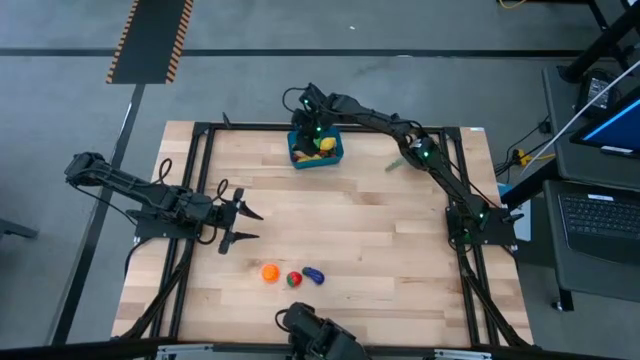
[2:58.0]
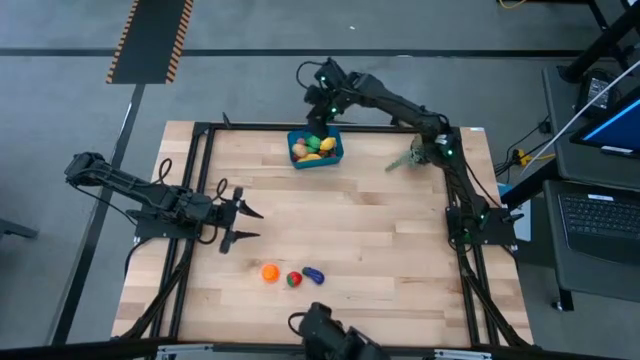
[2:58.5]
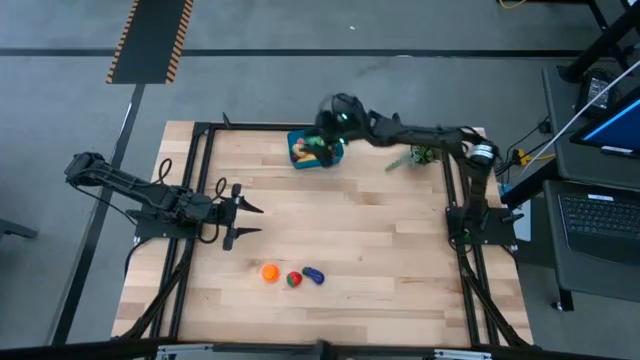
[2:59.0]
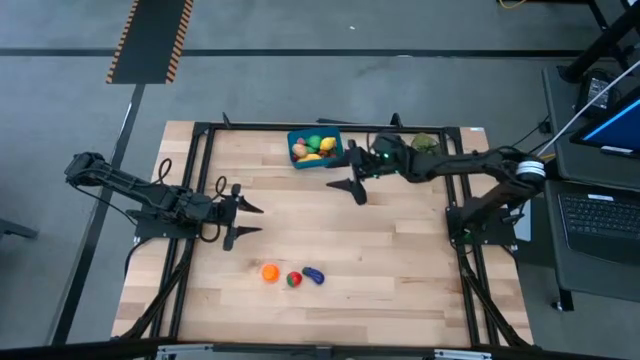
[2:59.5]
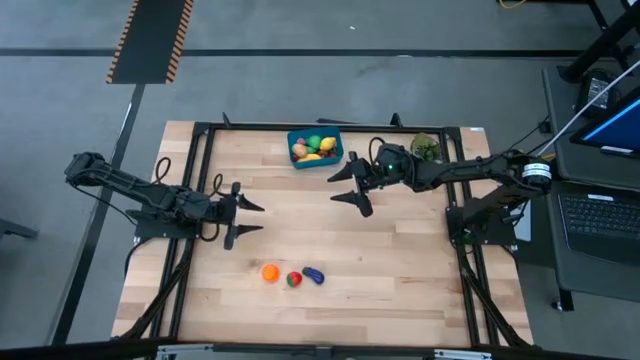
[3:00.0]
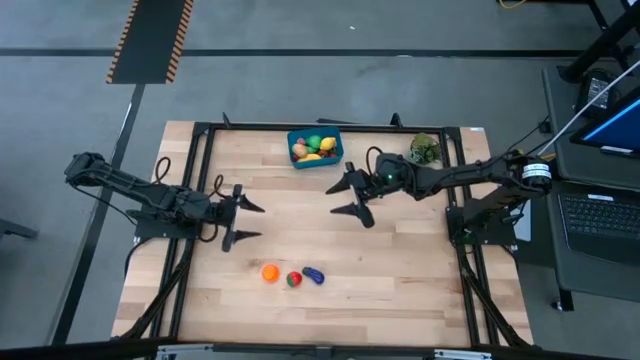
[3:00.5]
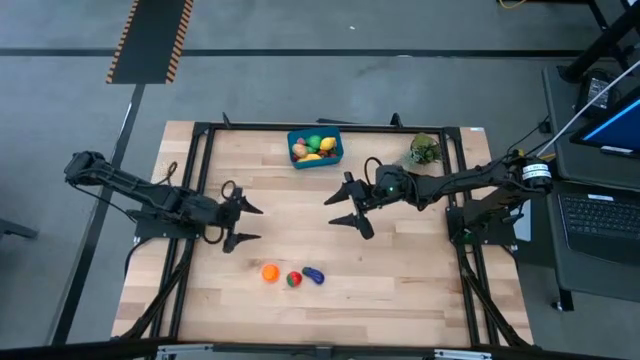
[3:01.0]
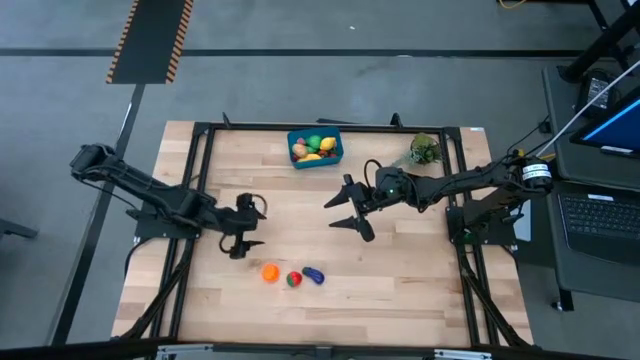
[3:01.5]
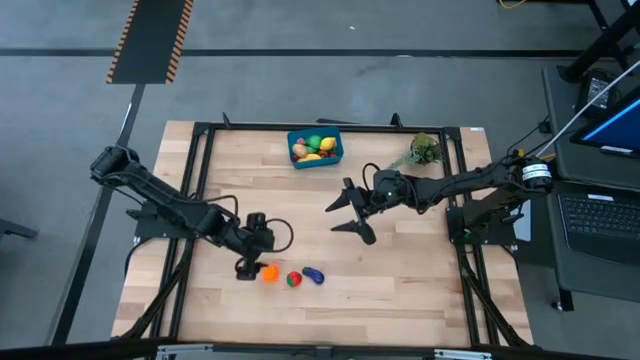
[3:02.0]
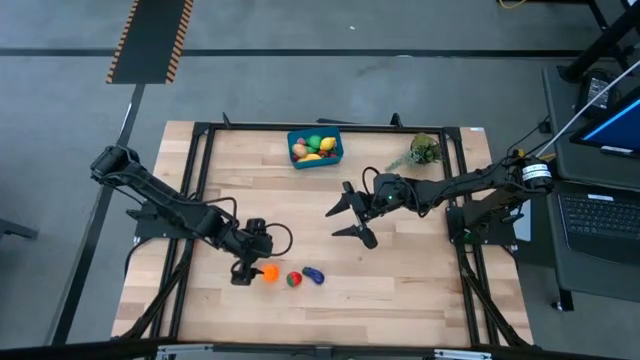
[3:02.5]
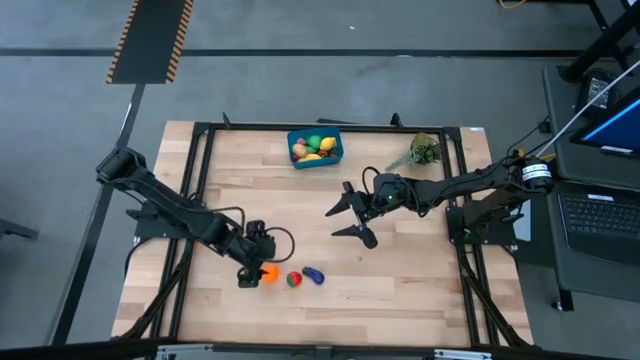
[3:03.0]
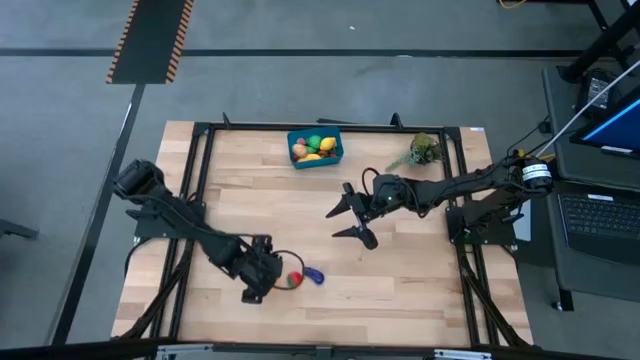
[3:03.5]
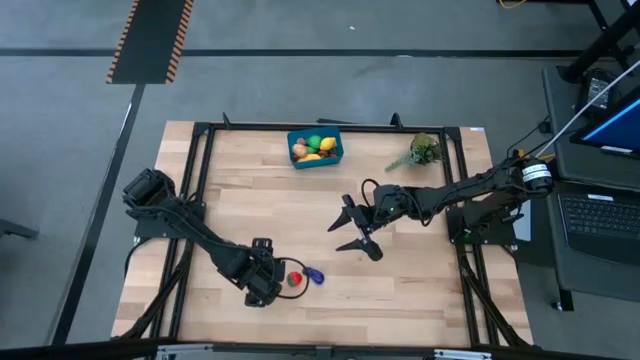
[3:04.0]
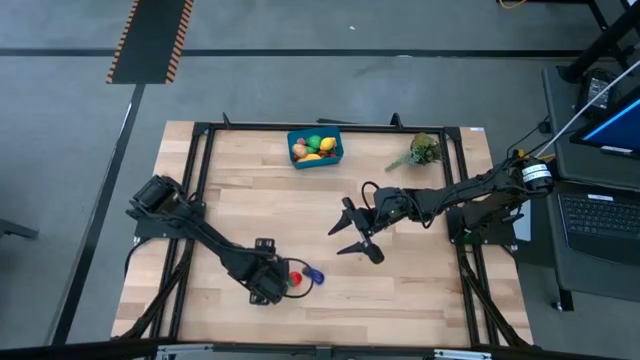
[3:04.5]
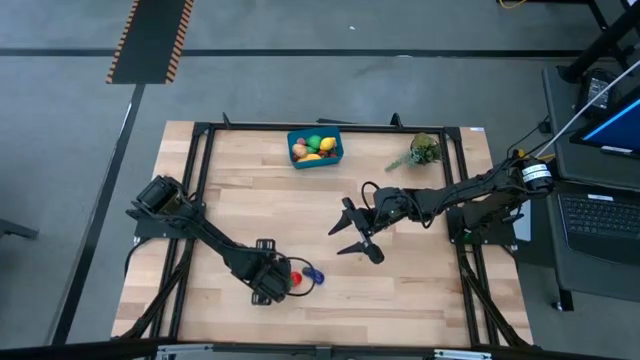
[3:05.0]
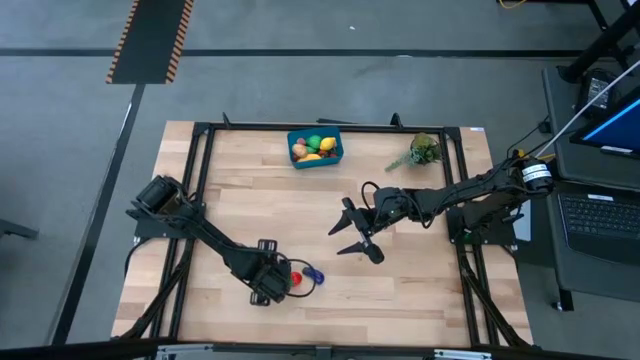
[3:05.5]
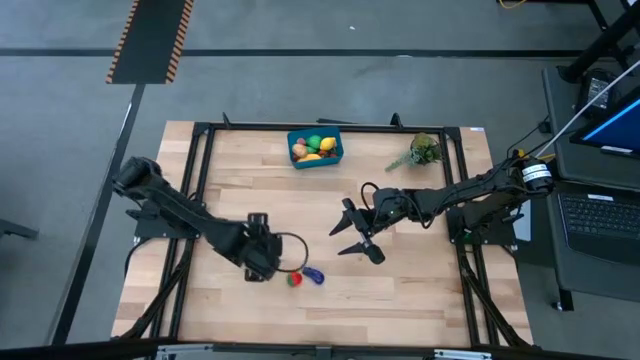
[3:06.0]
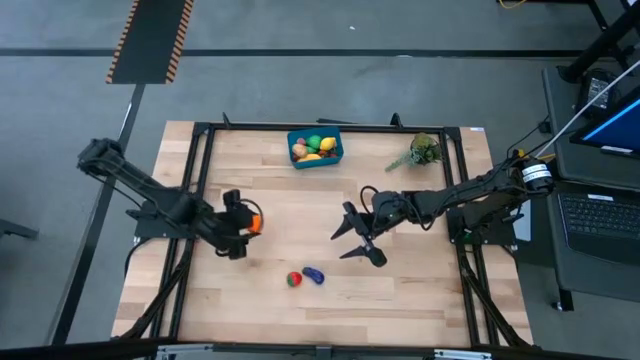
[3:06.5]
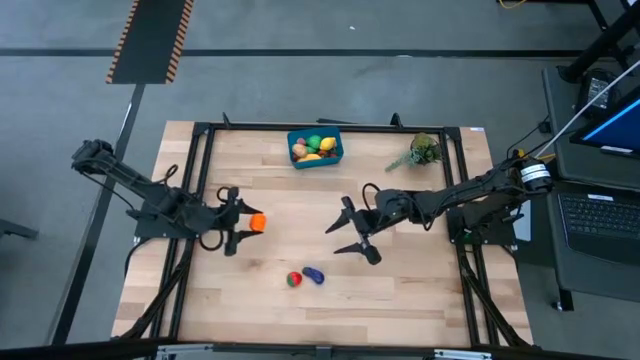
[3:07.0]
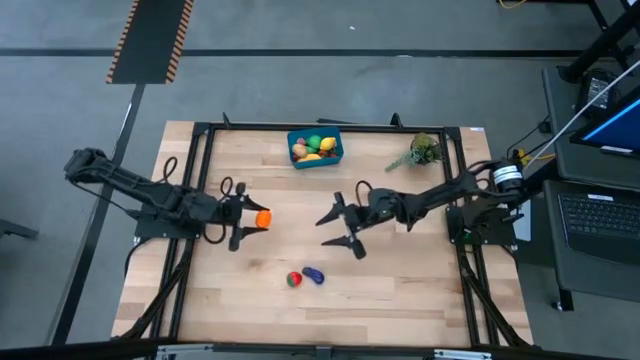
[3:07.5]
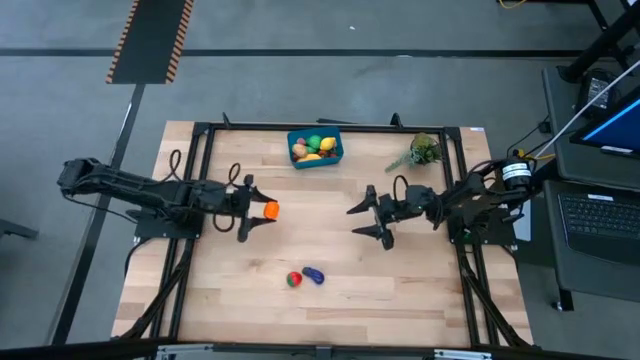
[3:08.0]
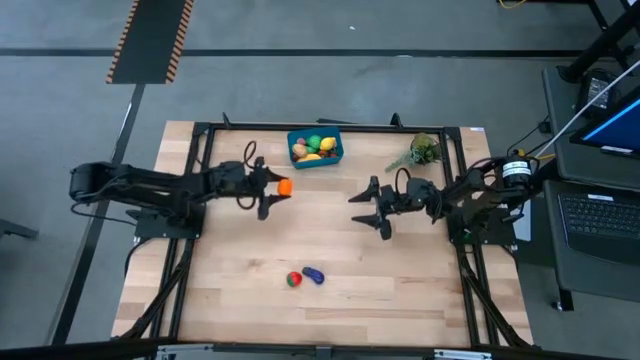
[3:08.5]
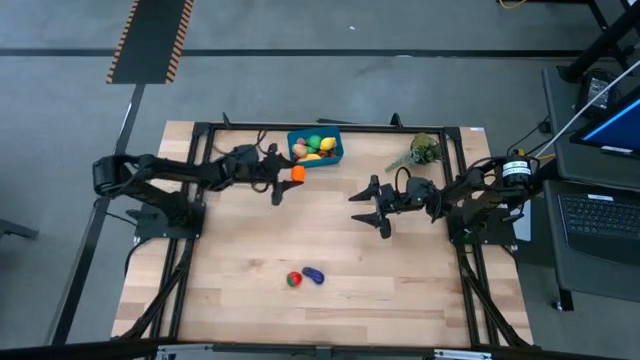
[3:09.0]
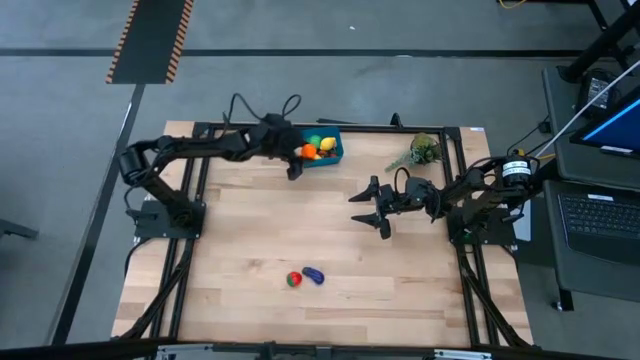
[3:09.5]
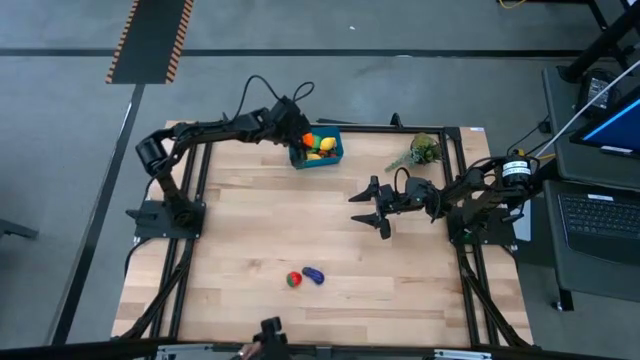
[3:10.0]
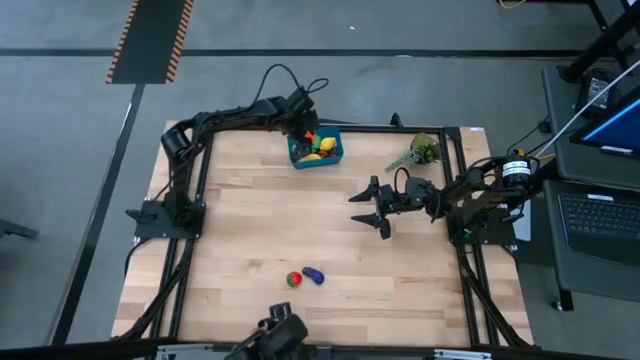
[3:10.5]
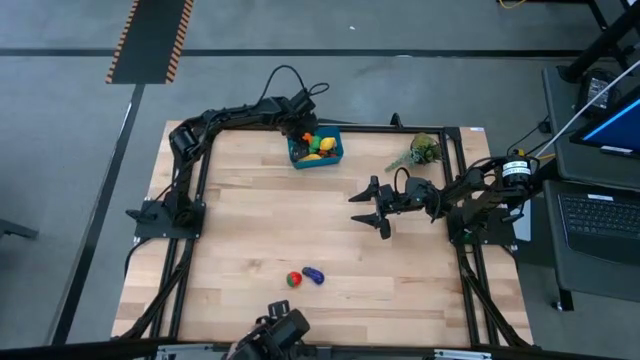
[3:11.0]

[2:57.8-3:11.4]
Task: Pick and placing Produce into tupperware
Put the tangerine into the blue bin

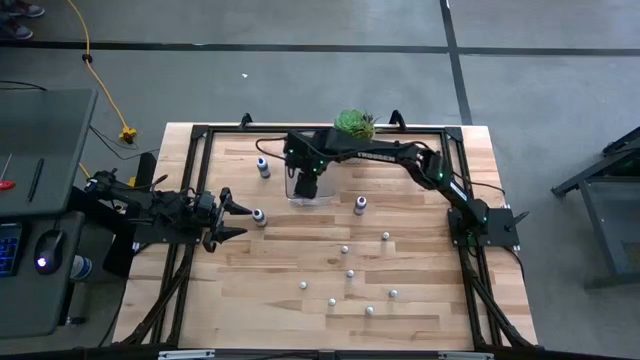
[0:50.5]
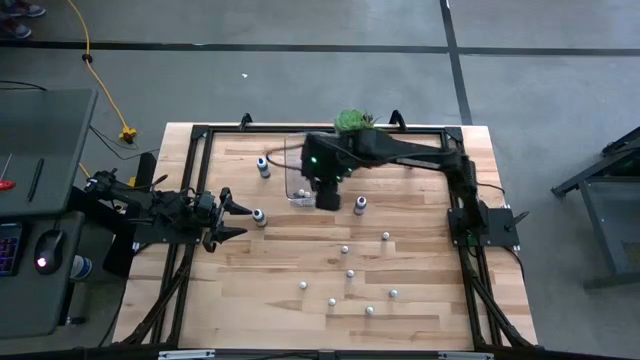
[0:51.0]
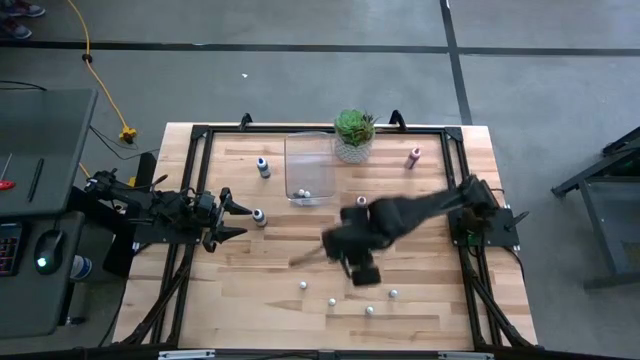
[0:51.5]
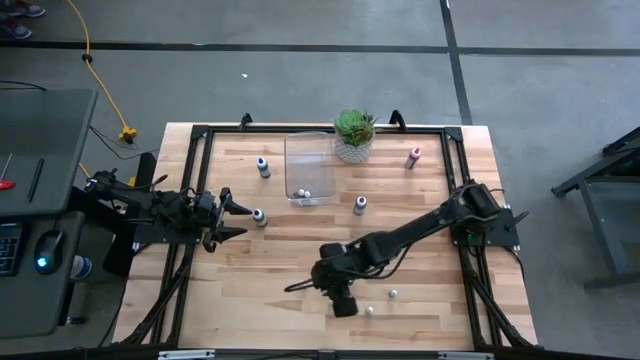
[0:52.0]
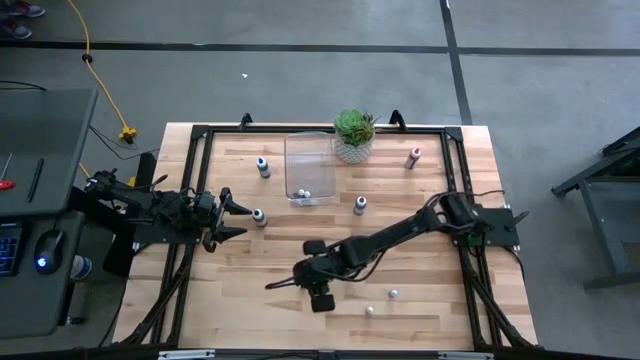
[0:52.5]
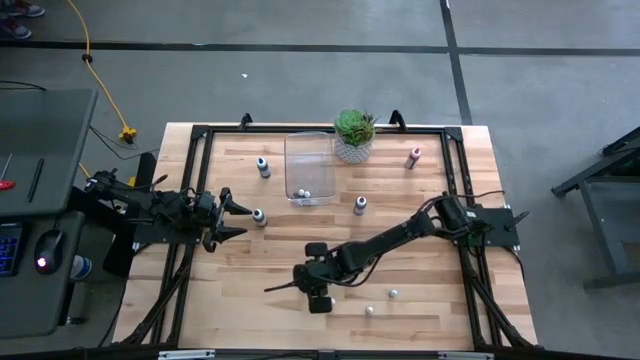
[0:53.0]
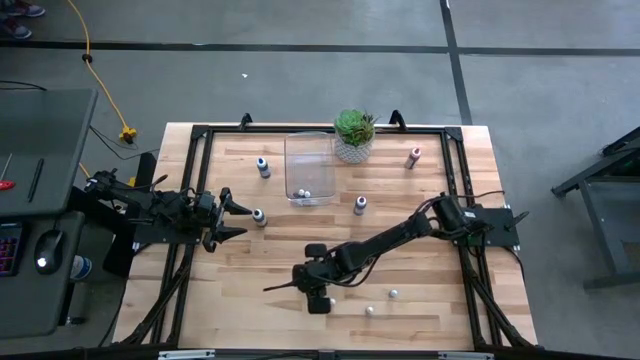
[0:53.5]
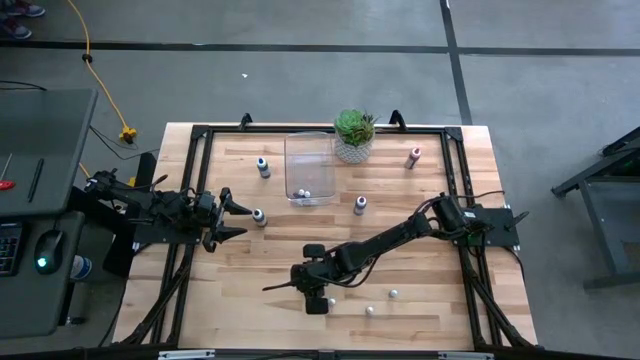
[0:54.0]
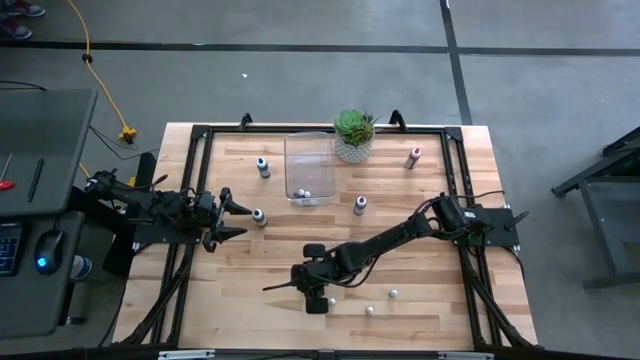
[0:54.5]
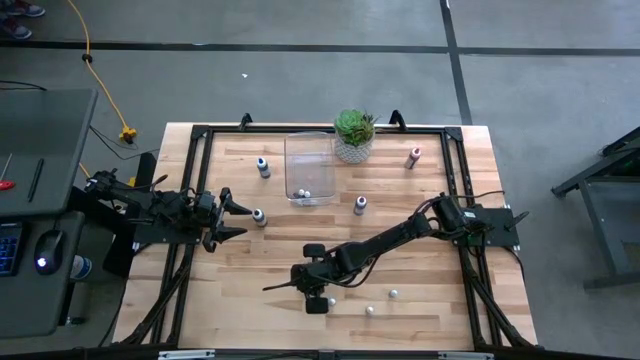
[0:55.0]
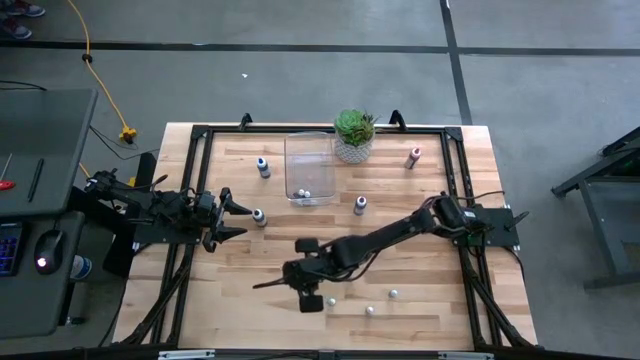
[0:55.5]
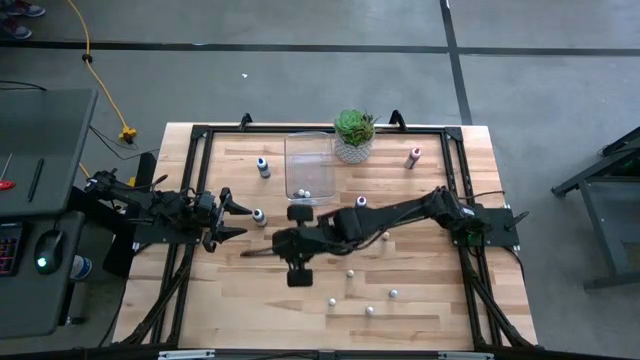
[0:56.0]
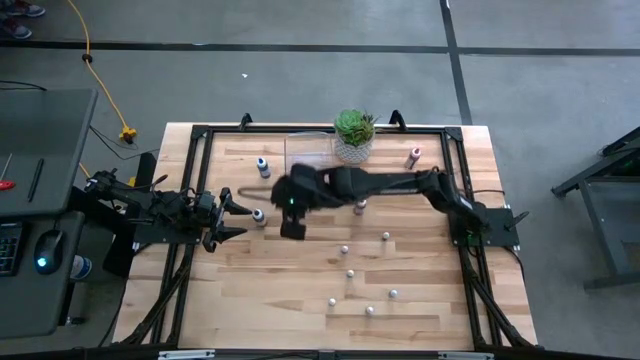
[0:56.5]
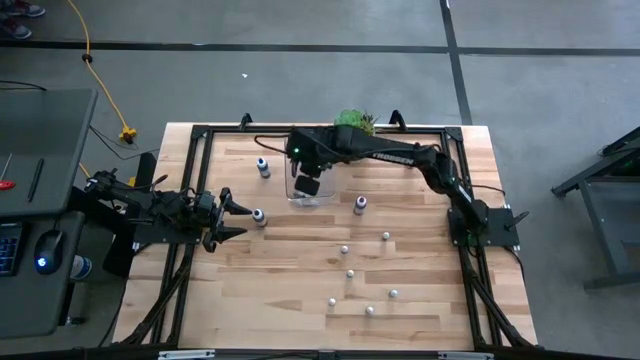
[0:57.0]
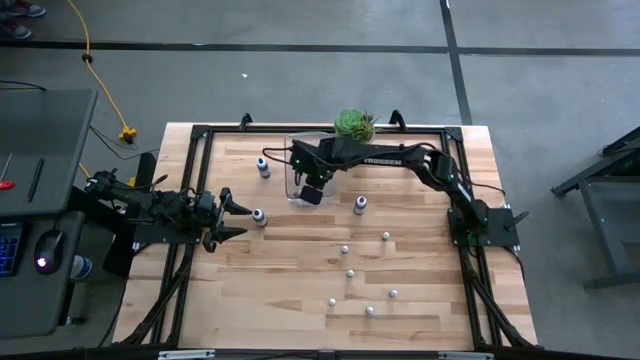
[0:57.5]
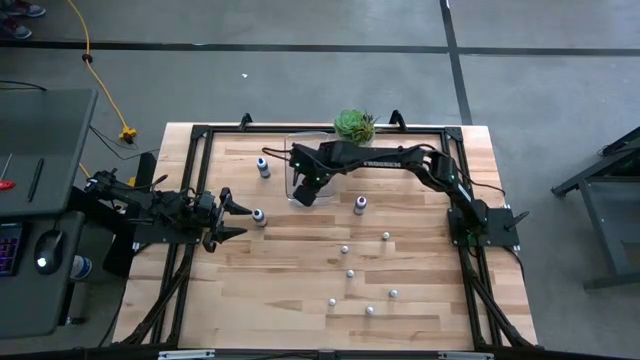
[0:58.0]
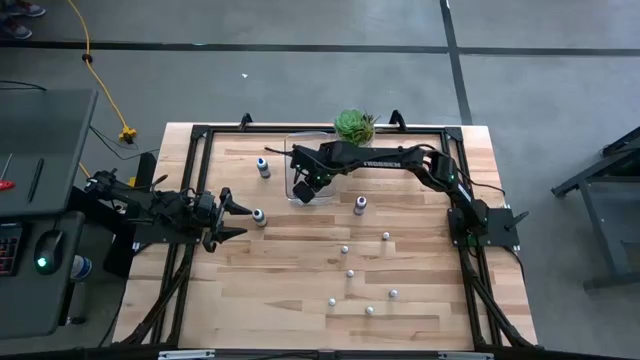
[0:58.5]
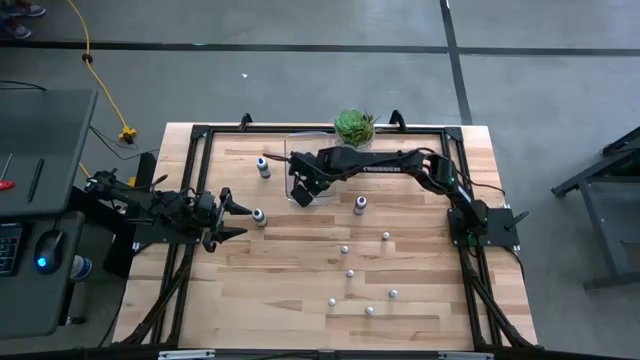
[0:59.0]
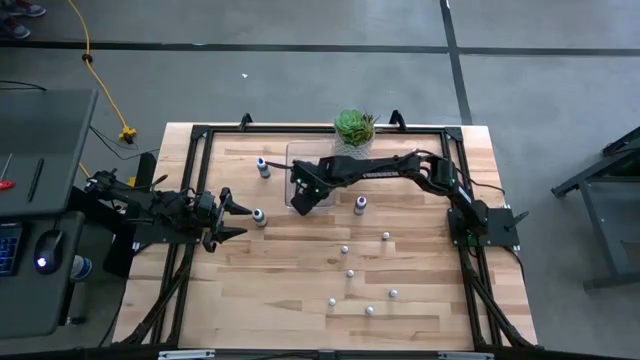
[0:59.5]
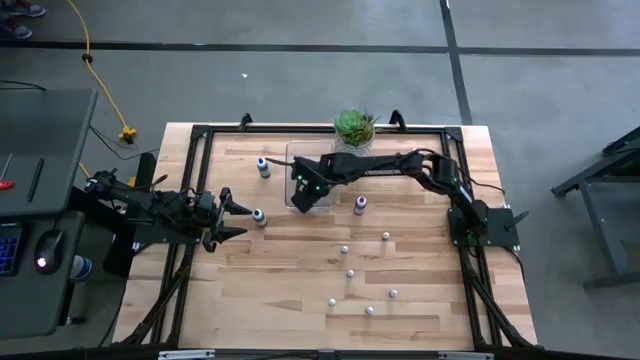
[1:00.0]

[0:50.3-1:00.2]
Task: Pick & Place food coloring
Put the small red food coloring bottle into the transparent bin
